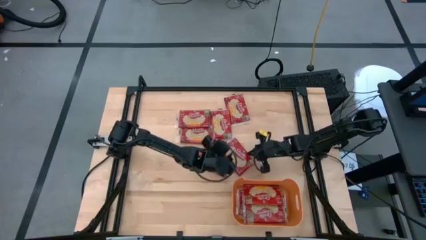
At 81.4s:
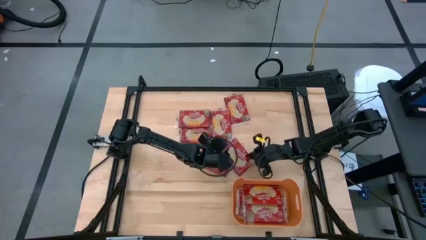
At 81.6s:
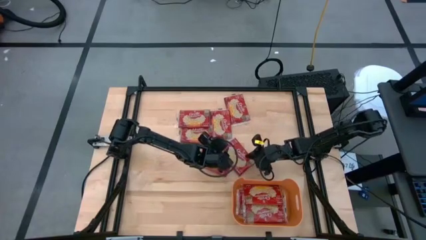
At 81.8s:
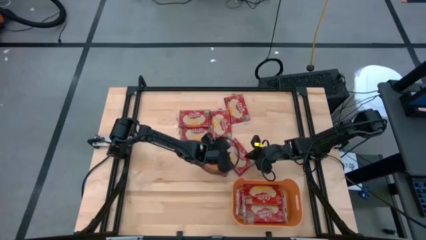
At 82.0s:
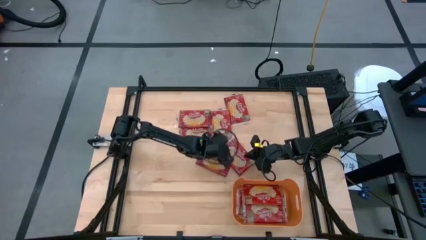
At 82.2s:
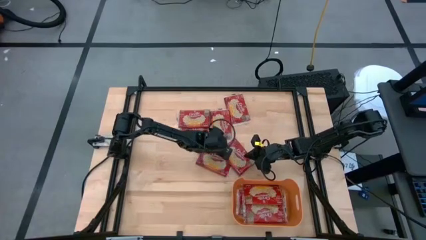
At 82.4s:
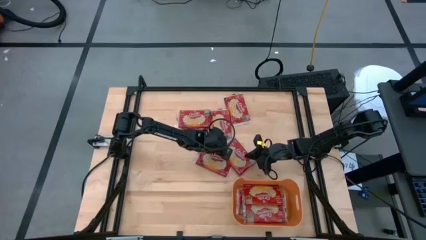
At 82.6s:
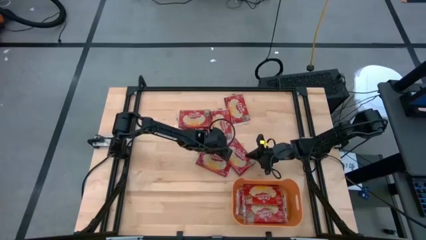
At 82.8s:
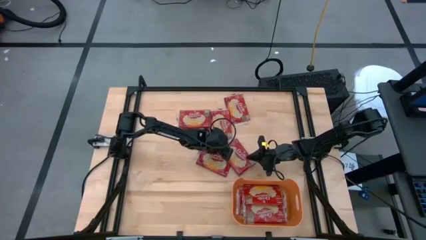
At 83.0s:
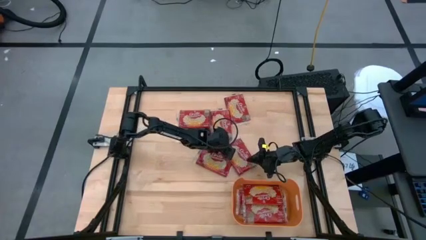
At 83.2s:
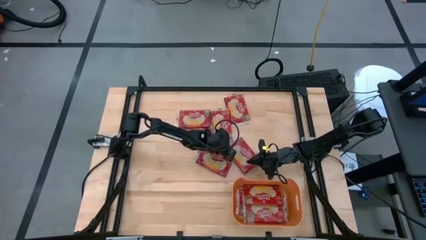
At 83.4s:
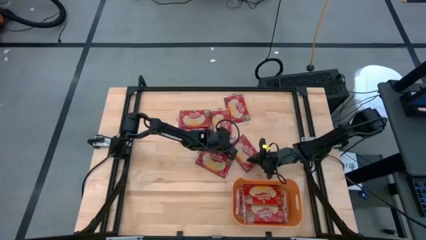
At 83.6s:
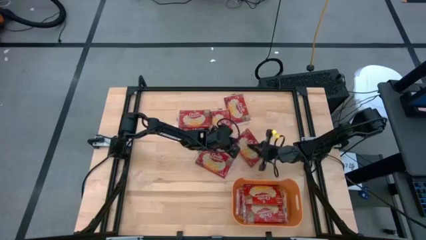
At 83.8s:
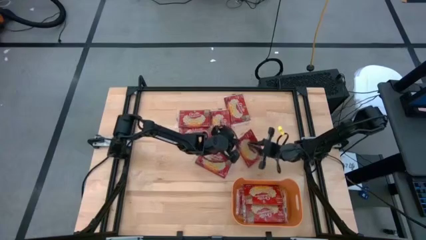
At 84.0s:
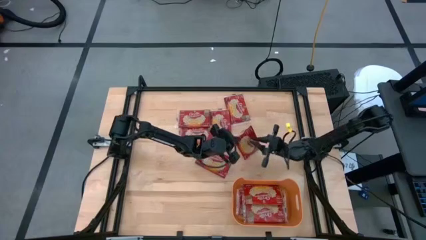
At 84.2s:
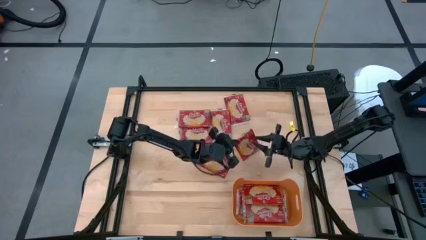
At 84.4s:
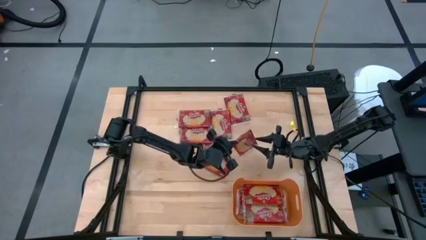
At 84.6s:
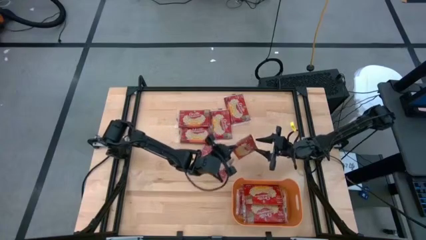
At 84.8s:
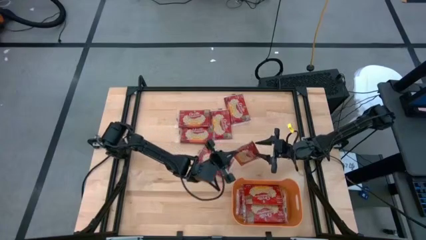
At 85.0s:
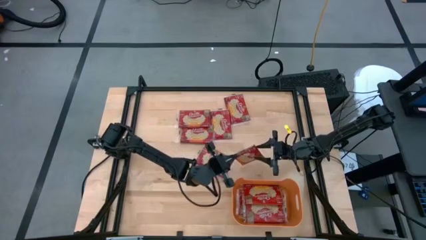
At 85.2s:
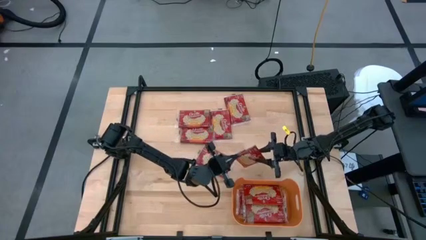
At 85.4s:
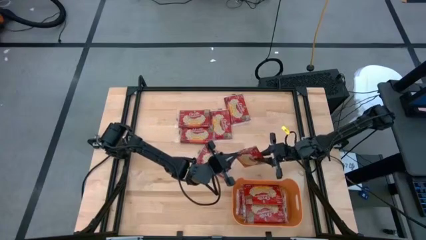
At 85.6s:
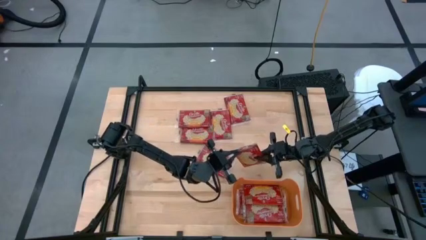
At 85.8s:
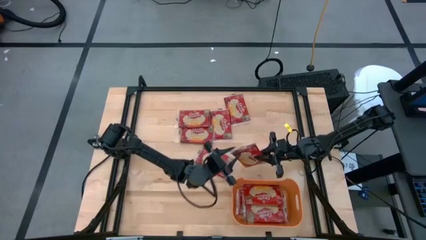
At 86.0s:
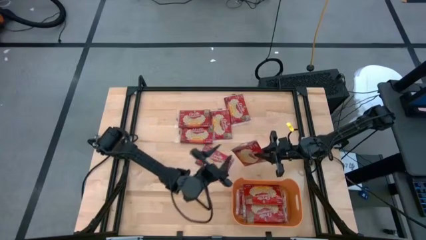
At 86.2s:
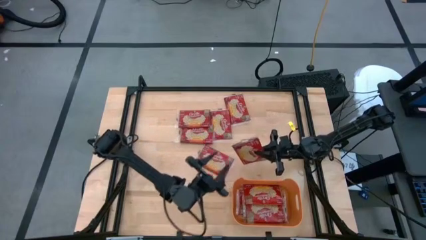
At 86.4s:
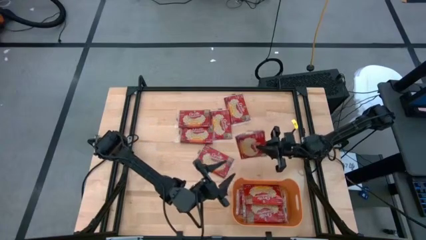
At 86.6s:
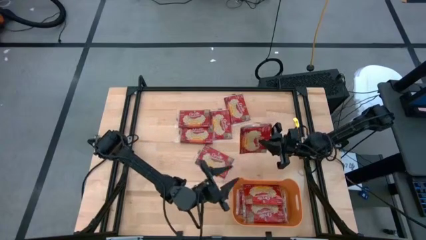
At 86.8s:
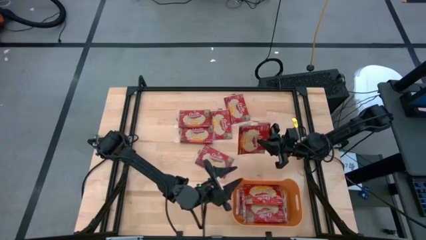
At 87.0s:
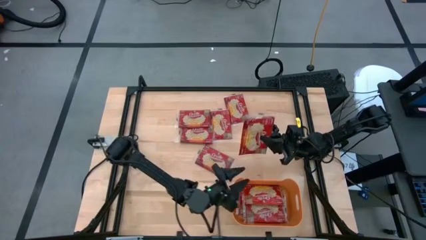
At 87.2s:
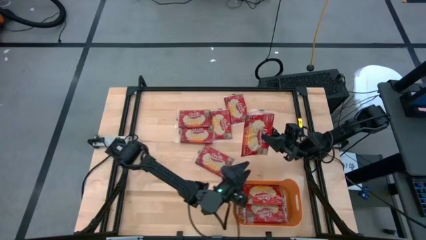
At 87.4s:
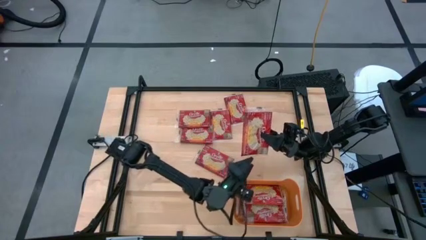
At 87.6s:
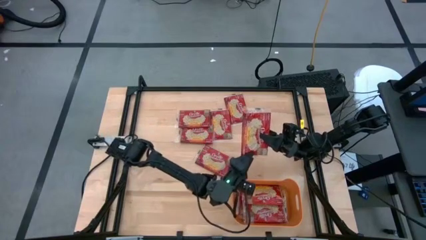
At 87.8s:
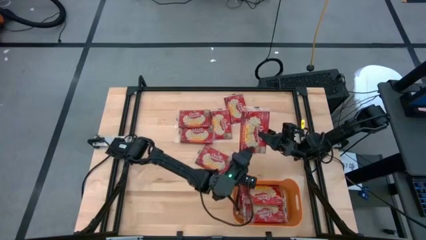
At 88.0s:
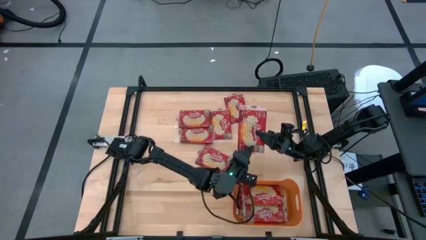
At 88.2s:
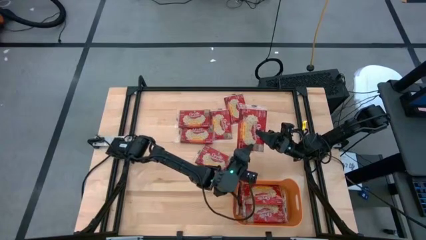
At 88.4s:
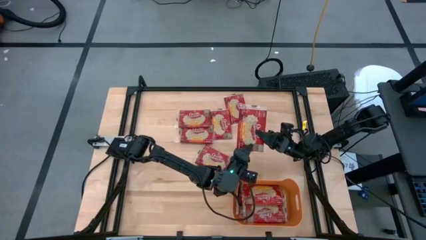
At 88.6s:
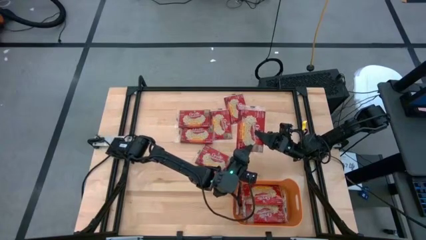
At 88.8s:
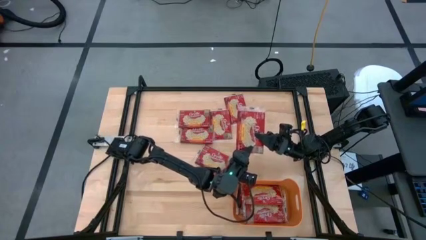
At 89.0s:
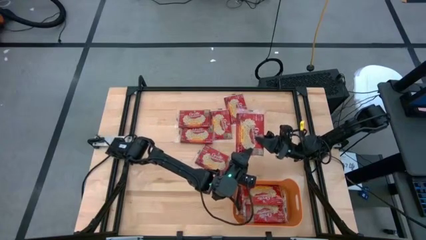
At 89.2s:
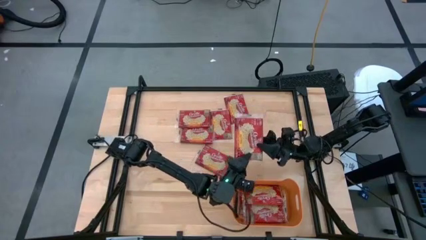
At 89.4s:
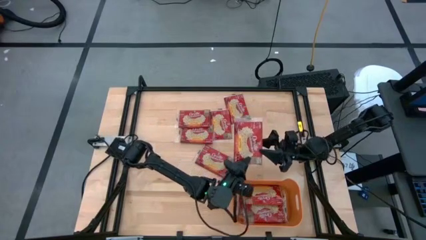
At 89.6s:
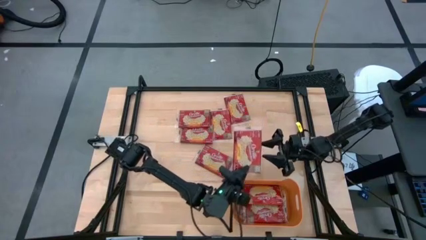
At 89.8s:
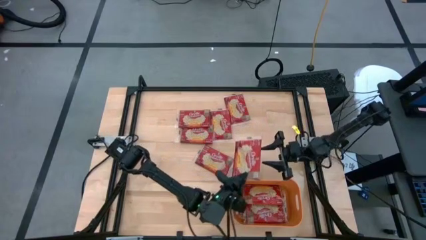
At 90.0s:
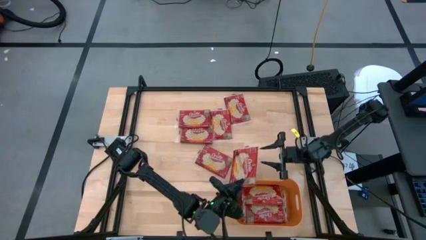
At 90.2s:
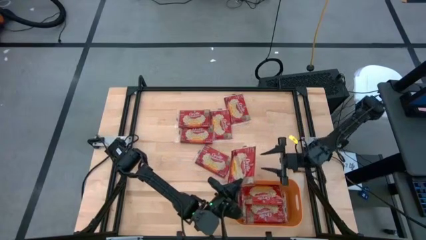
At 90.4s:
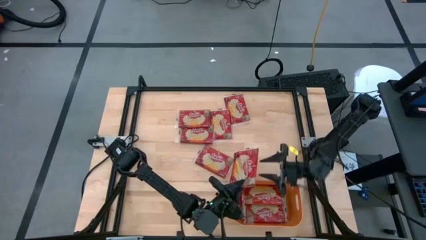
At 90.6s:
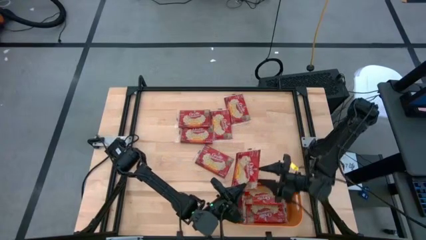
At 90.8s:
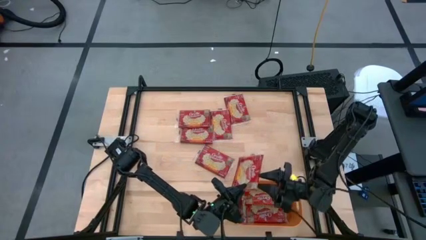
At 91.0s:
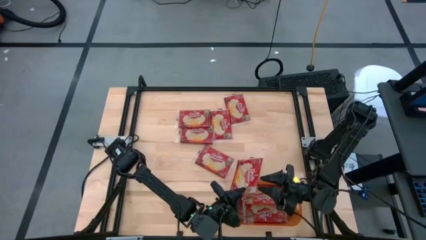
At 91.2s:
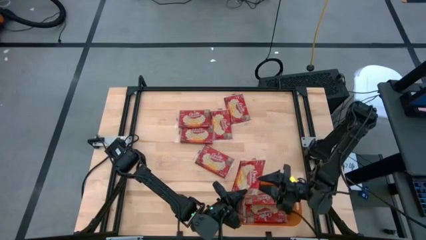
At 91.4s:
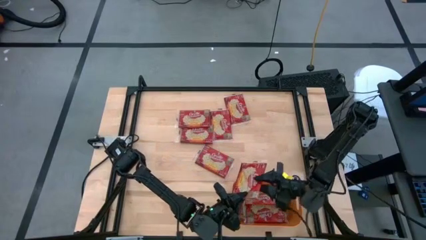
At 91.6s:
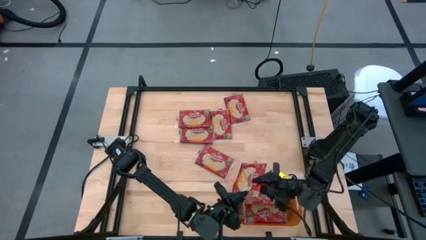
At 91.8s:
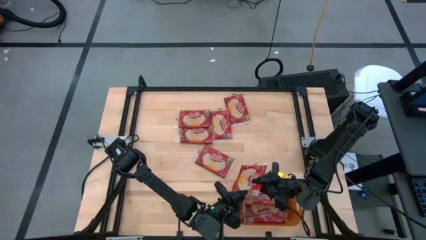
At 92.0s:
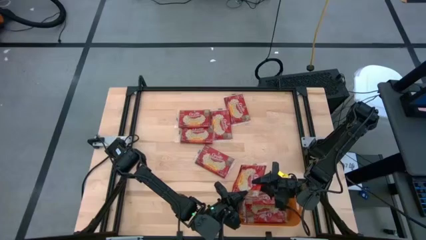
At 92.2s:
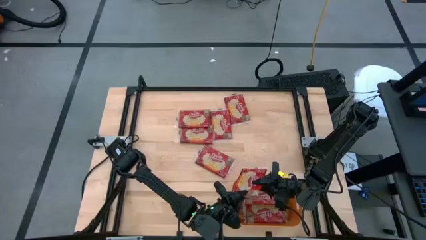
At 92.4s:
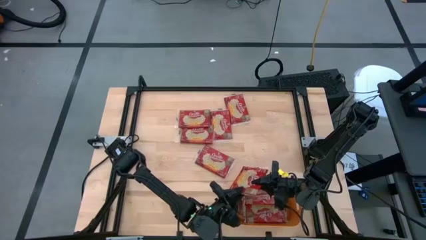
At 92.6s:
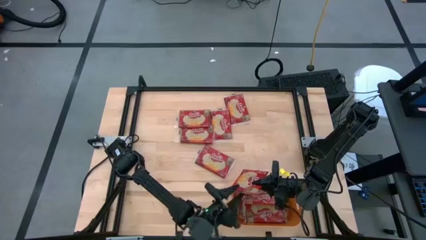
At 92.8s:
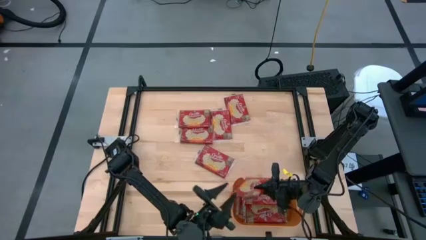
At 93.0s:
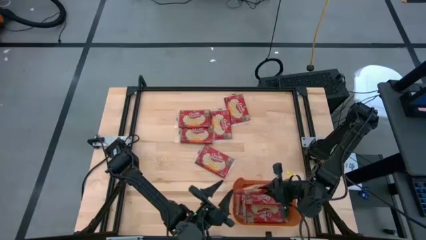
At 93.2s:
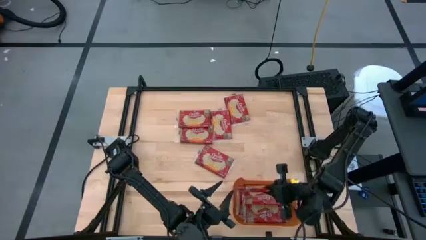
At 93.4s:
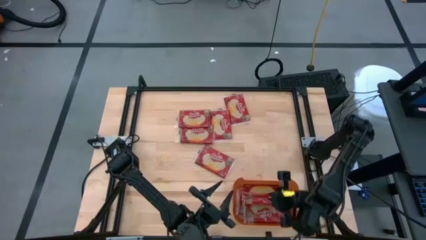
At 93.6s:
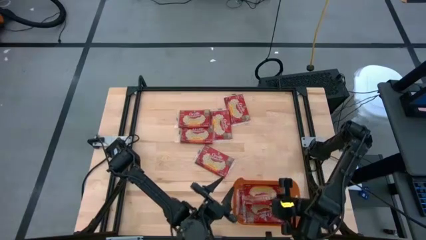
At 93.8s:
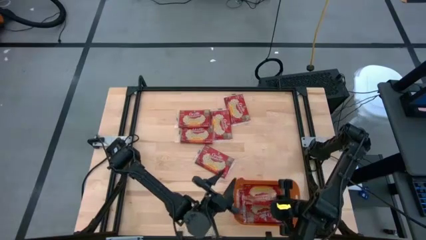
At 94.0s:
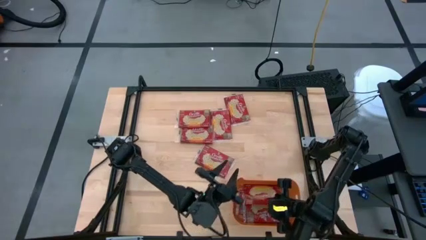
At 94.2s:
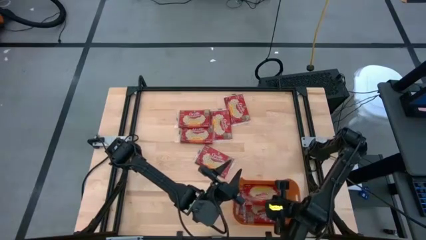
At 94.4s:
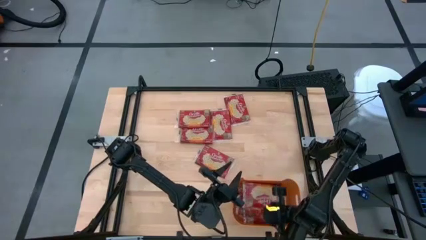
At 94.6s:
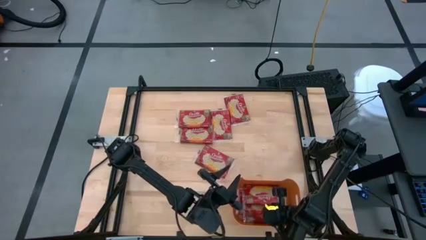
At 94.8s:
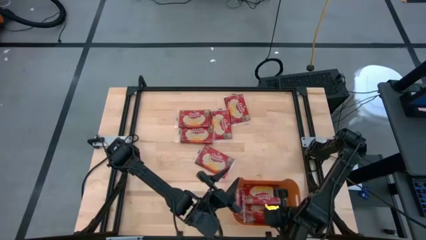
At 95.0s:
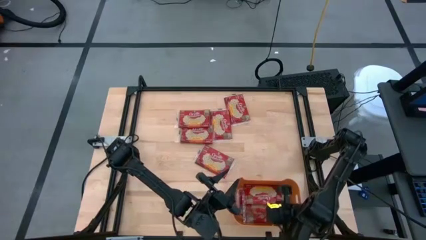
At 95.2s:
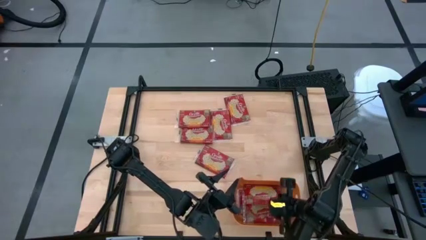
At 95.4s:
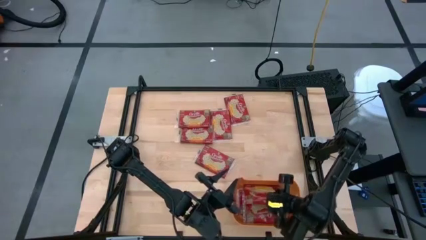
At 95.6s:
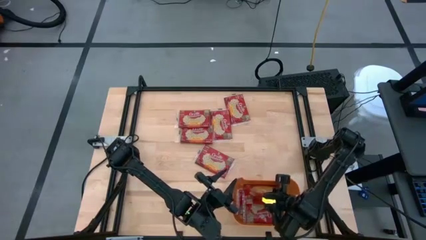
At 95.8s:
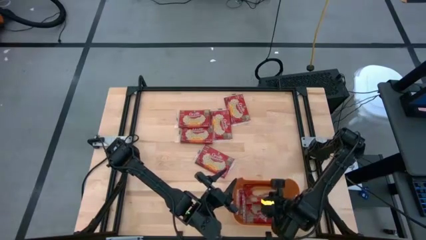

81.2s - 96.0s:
Task: Sort popcorn bags into baskets
Put the red popcorn bag into the orange bin

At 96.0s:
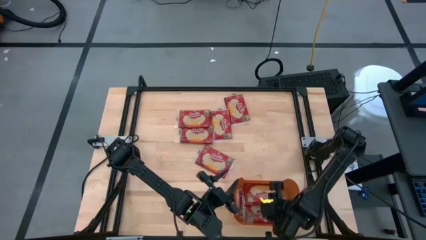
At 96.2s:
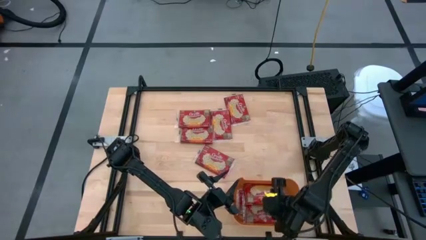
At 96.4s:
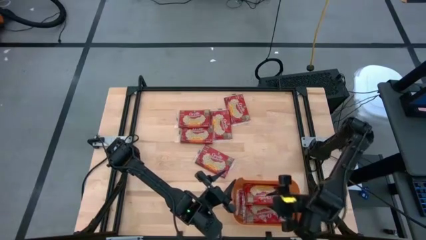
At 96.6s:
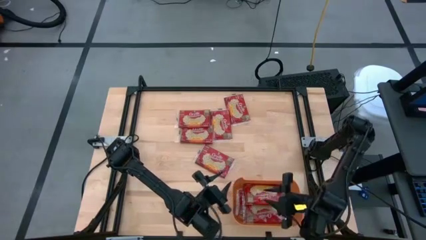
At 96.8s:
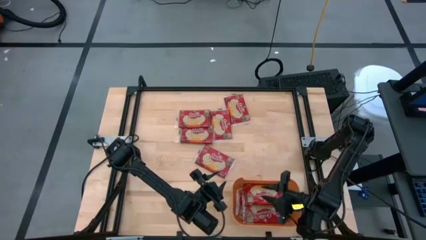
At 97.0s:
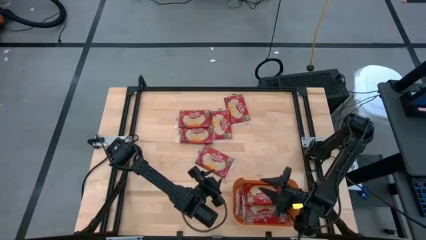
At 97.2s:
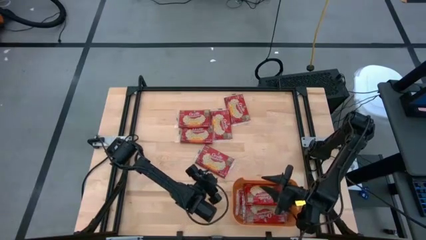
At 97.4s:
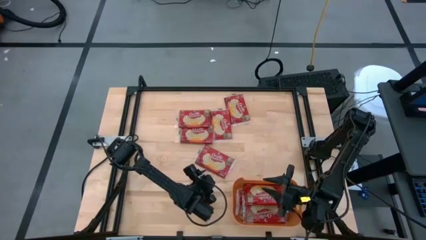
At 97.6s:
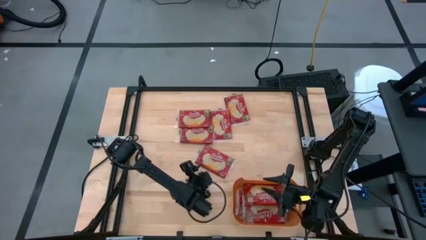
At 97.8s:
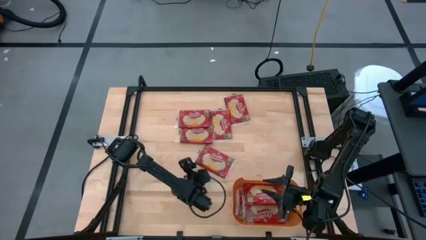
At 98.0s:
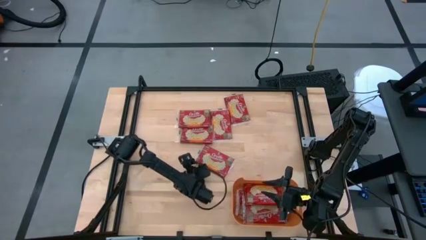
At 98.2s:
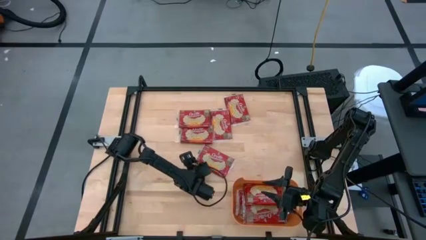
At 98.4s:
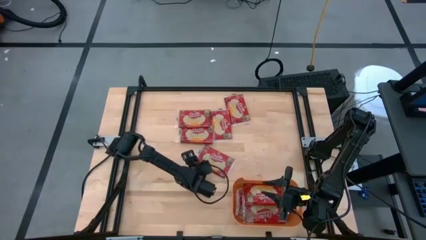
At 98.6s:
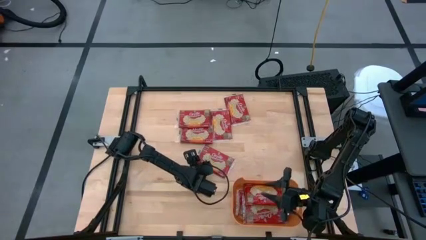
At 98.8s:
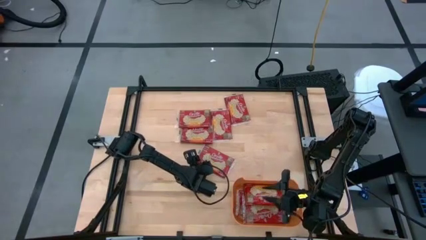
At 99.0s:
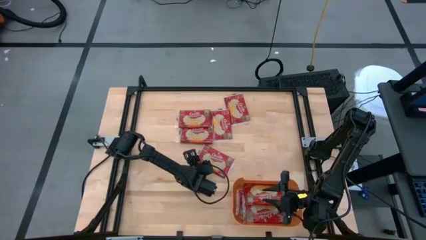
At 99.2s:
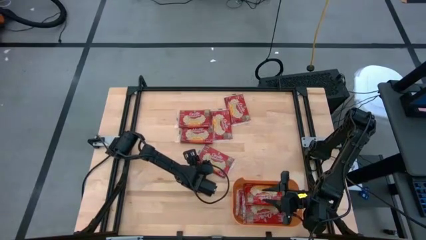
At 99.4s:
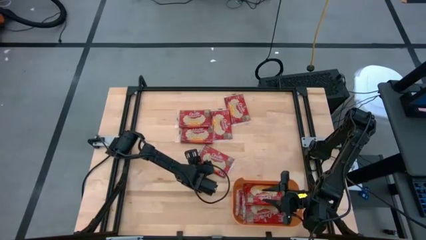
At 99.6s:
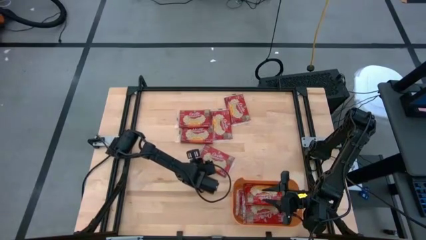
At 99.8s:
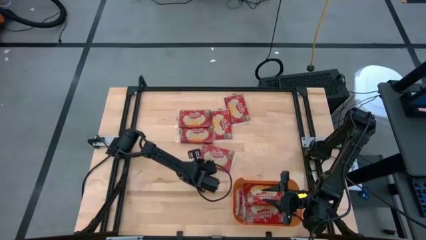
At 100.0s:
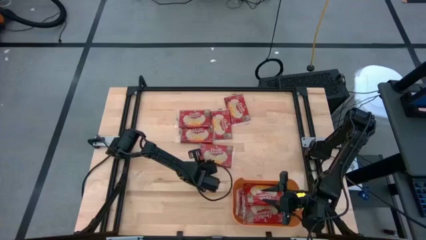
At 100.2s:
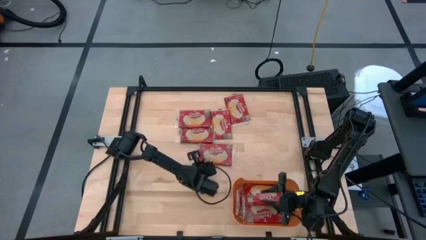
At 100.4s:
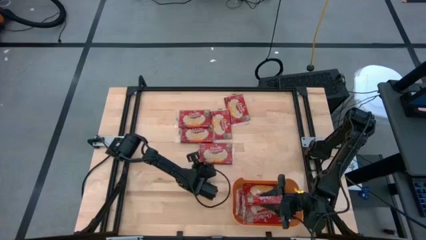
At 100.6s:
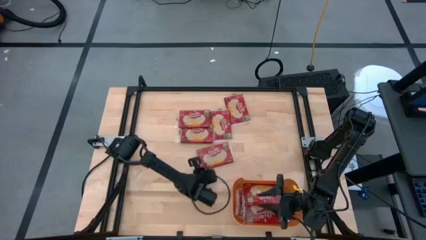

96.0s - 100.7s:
Put the red popcorn bag into the orange bin
